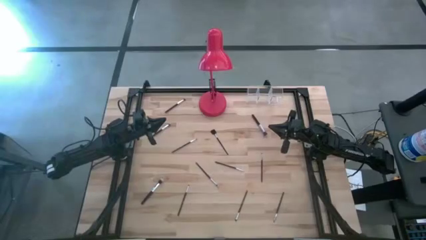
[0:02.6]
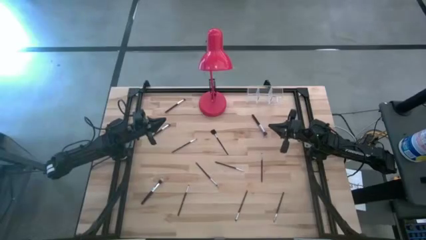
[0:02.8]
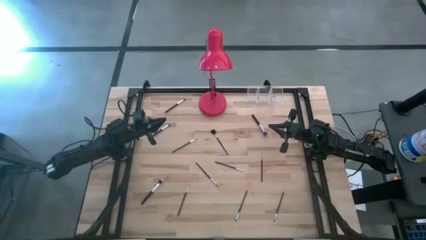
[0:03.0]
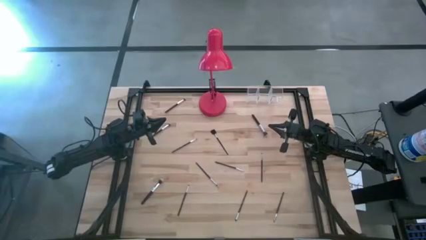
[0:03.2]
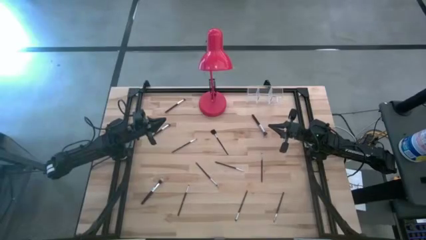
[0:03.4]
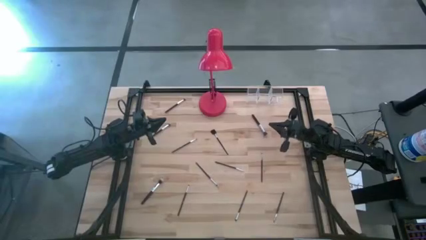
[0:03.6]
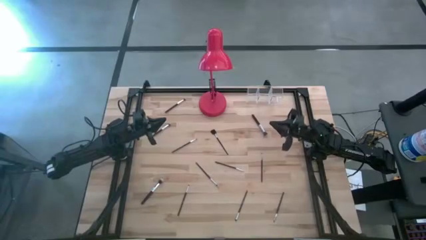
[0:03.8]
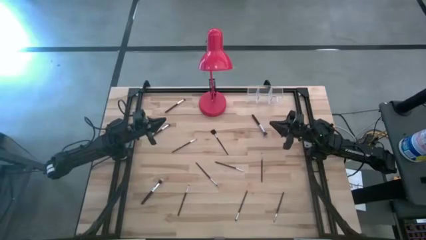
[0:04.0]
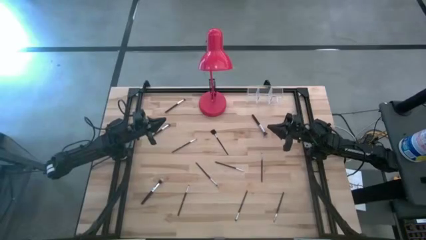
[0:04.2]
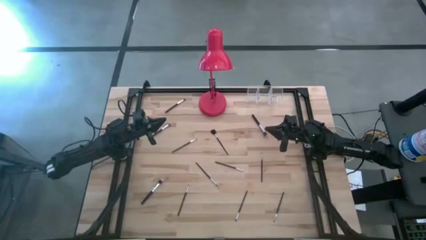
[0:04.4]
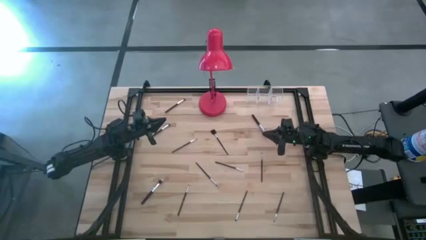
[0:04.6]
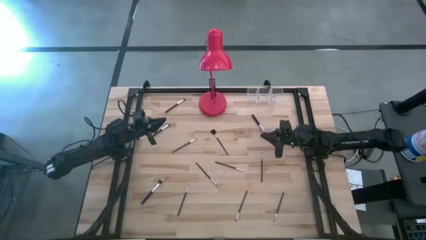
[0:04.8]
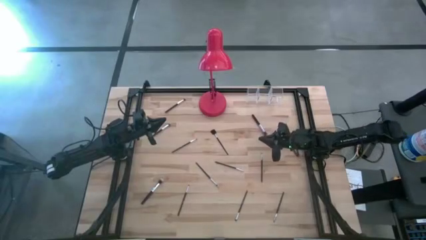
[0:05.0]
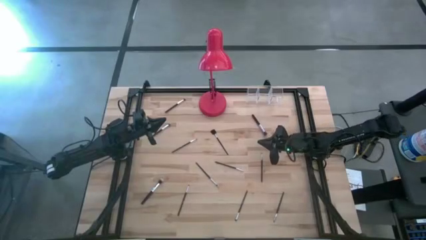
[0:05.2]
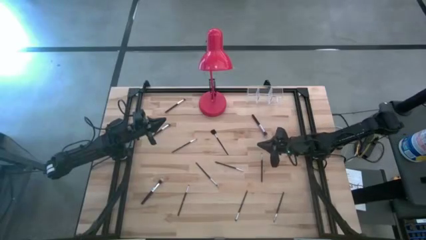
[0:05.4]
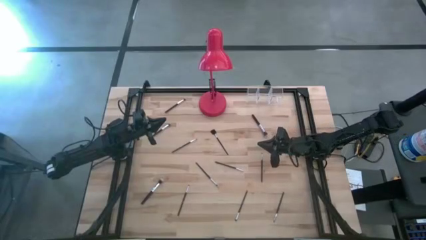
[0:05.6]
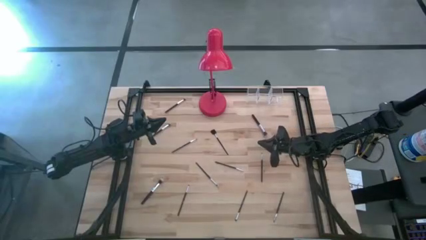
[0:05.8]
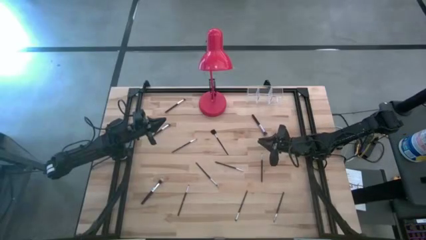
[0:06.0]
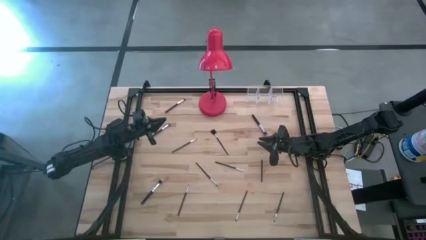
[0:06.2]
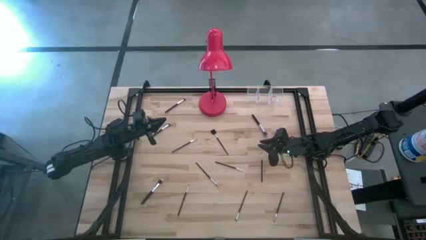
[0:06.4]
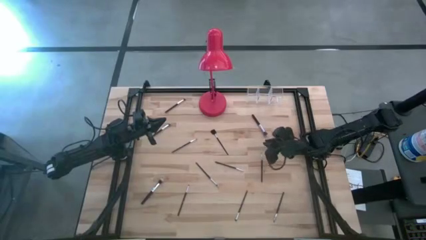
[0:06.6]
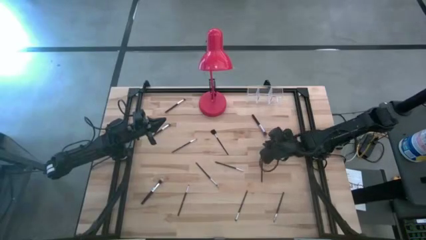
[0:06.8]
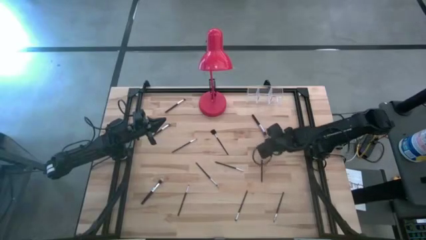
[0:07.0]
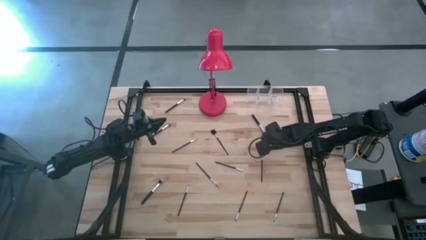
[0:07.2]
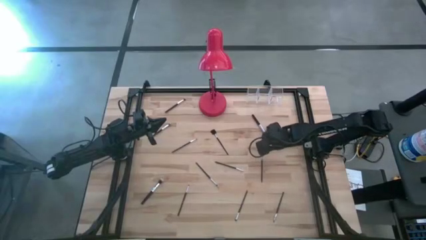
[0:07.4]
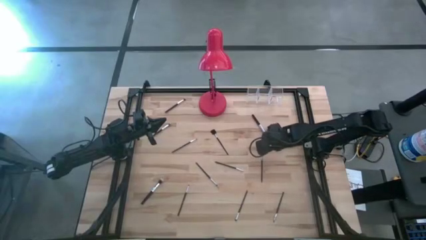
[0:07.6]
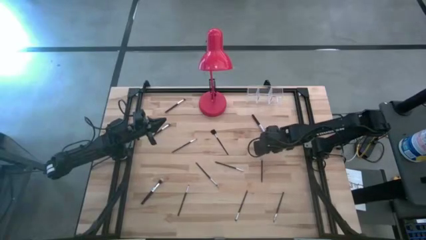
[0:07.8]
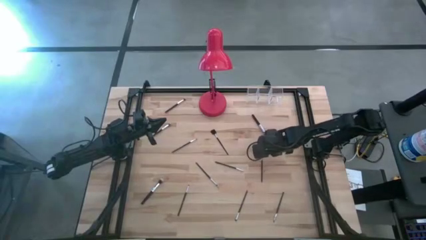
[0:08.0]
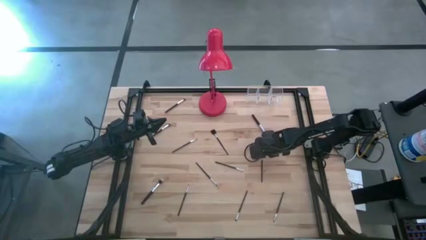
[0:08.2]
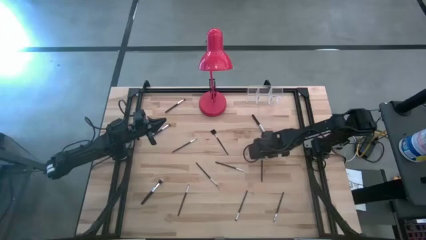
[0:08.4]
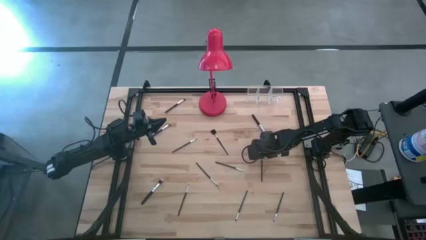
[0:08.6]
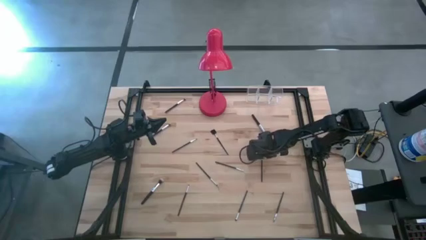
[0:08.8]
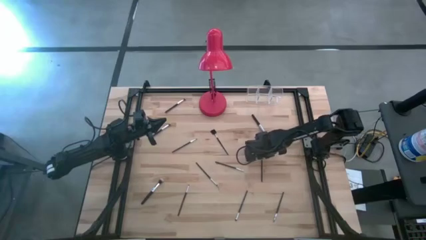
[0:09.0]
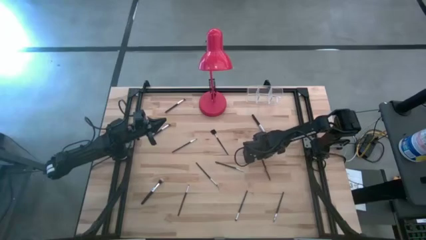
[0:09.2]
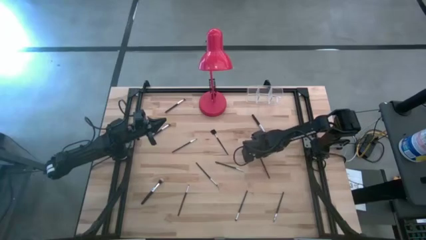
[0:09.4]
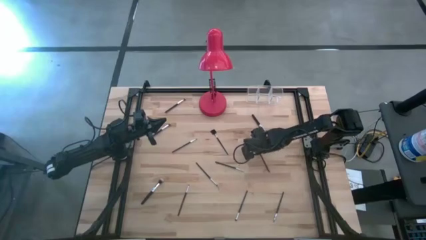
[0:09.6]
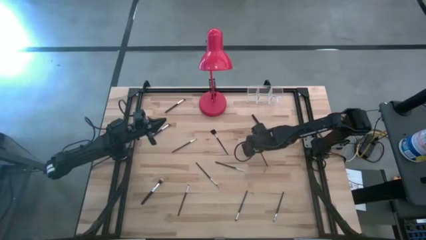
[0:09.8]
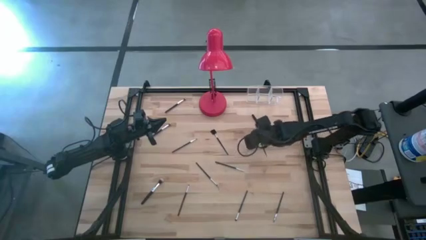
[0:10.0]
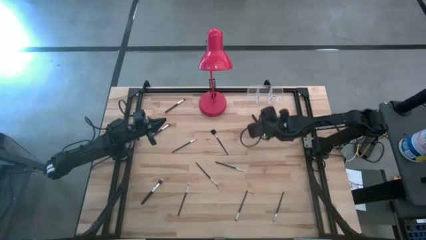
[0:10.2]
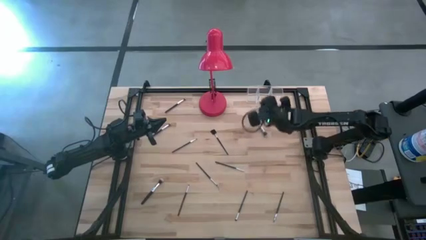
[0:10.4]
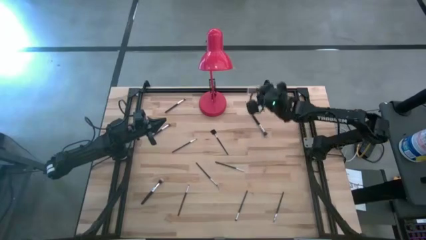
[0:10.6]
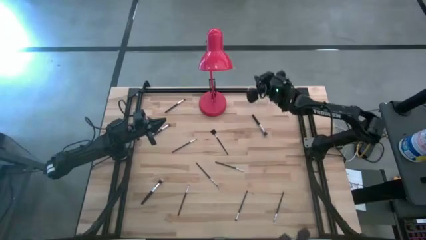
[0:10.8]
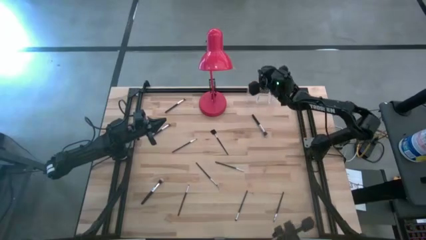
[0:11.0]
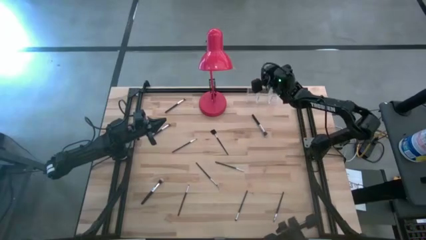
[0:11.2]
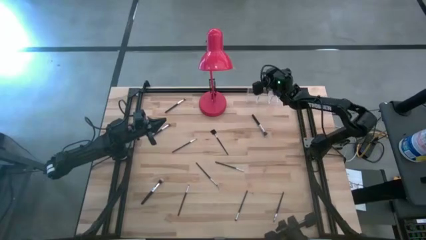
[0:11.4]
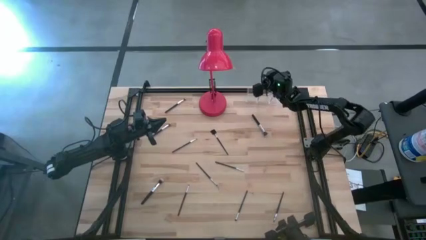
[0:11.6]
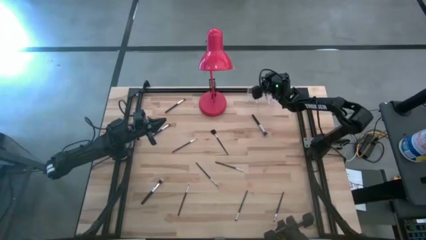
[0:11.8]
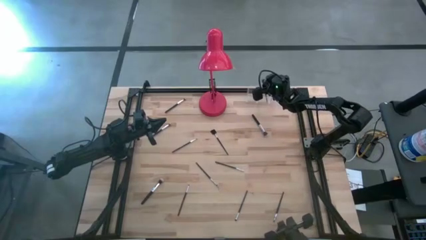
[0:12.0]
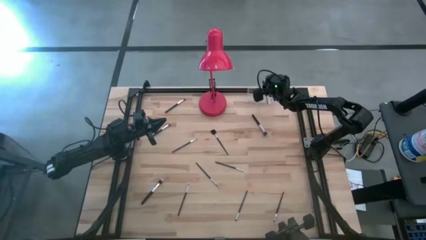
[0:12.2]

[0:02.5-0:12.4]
Task: Sort items
Put the black eyeshadow brush into the transparent organizer

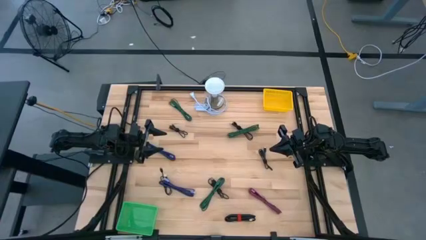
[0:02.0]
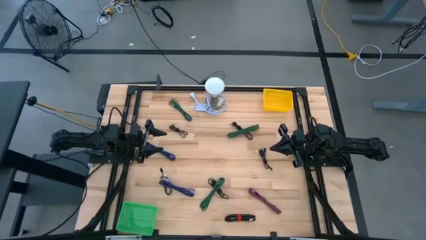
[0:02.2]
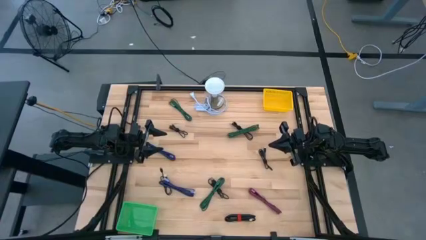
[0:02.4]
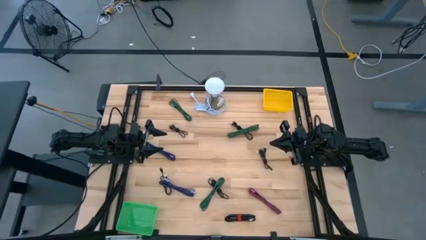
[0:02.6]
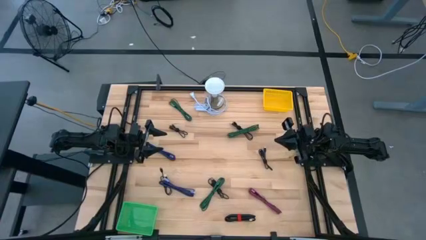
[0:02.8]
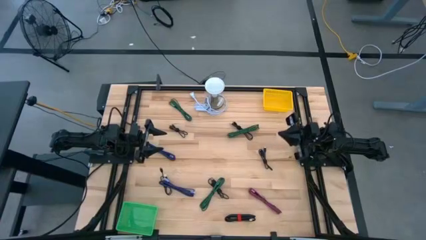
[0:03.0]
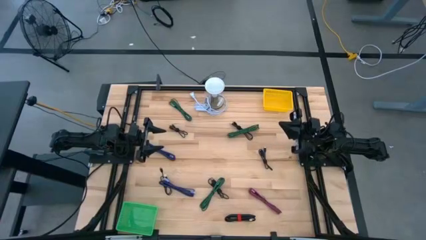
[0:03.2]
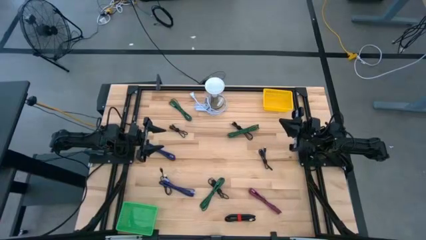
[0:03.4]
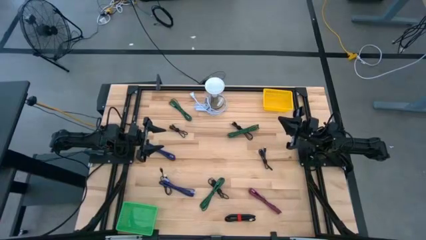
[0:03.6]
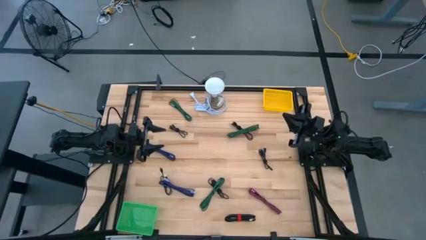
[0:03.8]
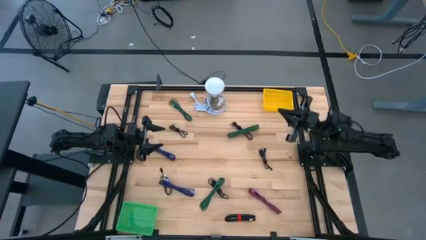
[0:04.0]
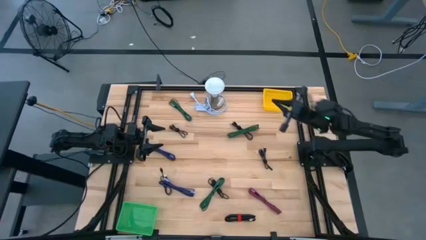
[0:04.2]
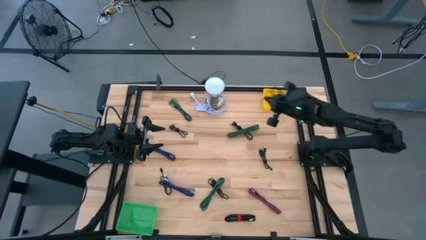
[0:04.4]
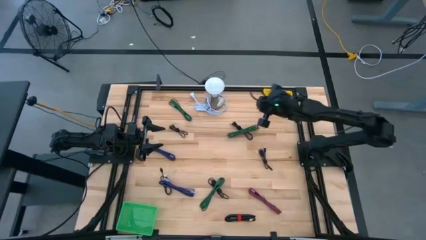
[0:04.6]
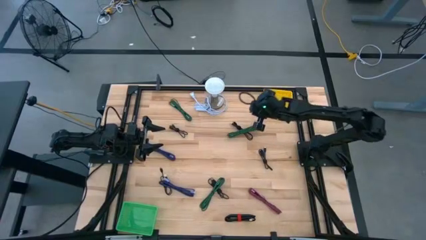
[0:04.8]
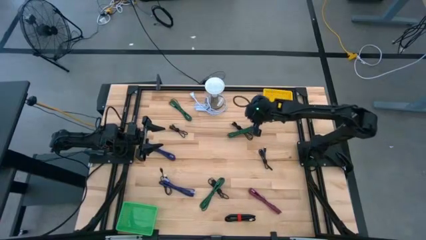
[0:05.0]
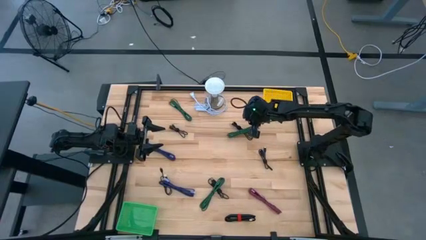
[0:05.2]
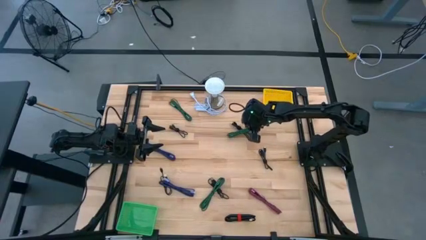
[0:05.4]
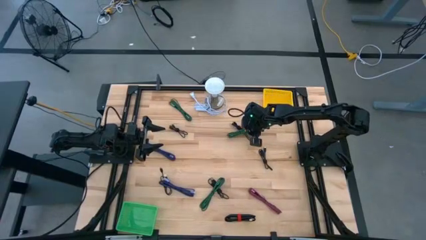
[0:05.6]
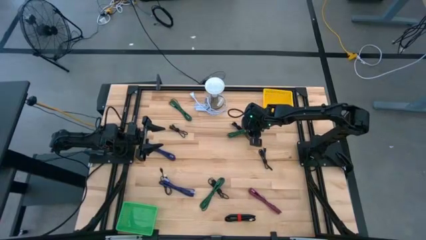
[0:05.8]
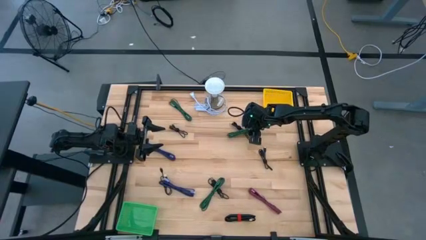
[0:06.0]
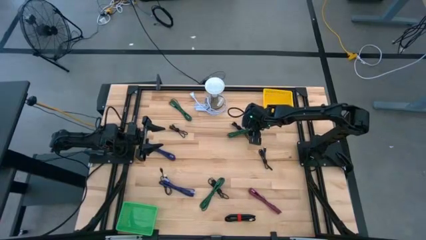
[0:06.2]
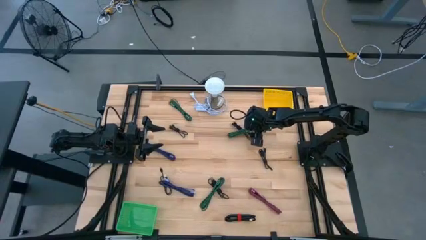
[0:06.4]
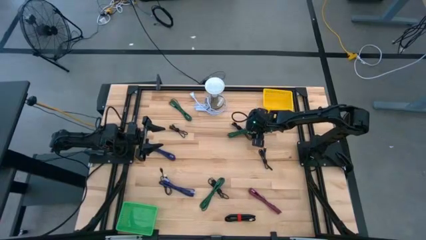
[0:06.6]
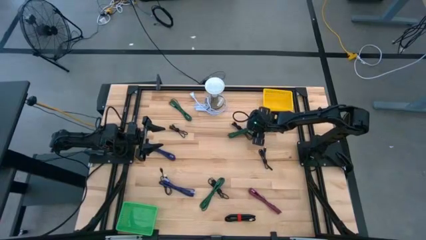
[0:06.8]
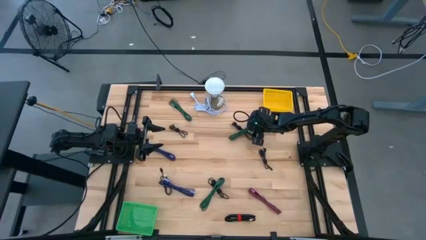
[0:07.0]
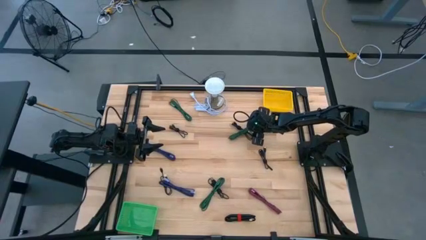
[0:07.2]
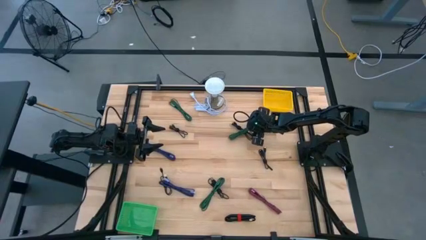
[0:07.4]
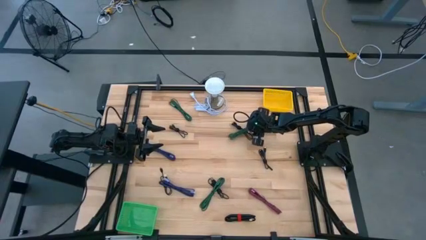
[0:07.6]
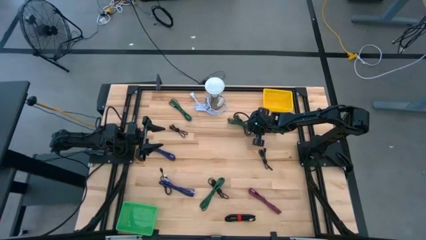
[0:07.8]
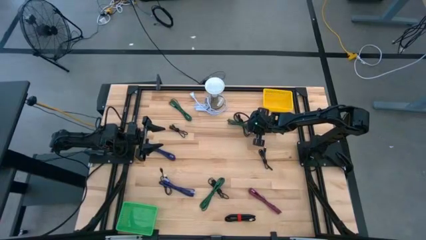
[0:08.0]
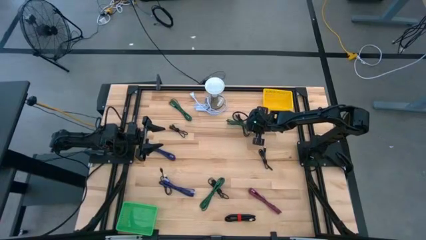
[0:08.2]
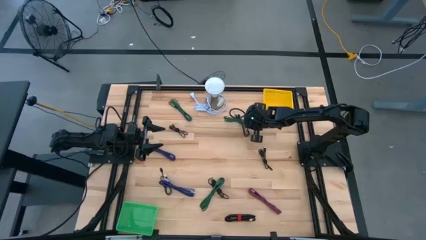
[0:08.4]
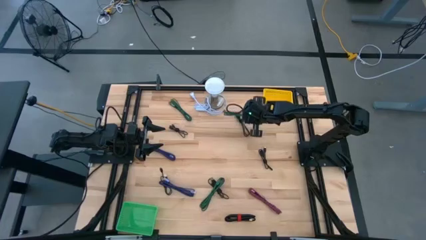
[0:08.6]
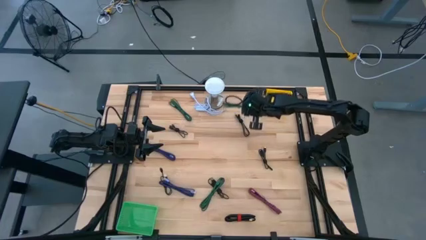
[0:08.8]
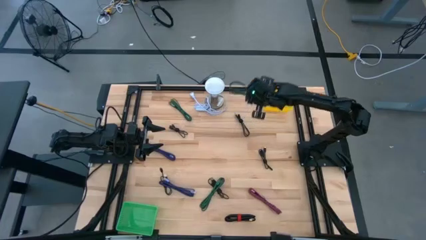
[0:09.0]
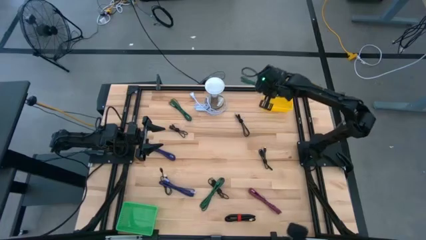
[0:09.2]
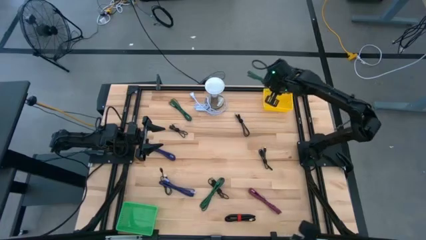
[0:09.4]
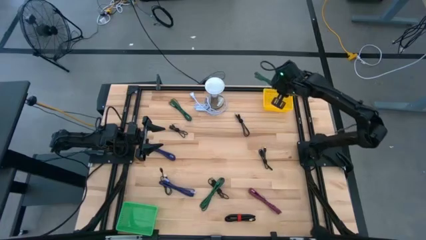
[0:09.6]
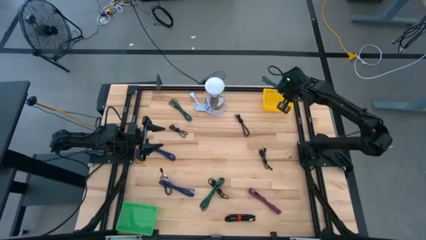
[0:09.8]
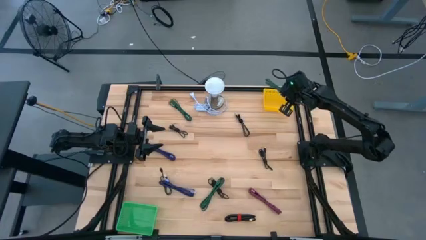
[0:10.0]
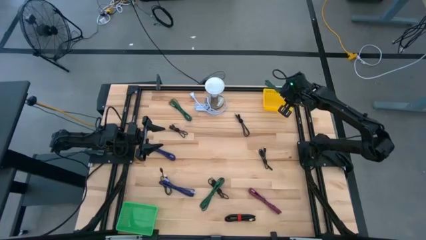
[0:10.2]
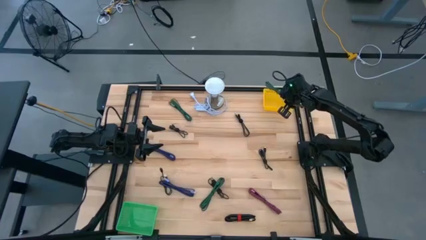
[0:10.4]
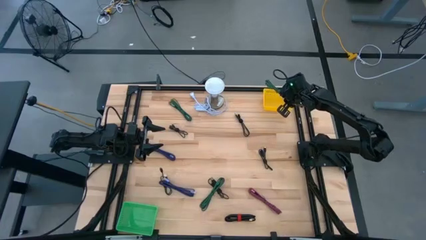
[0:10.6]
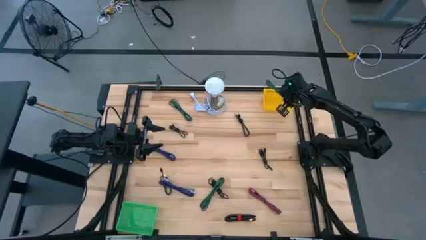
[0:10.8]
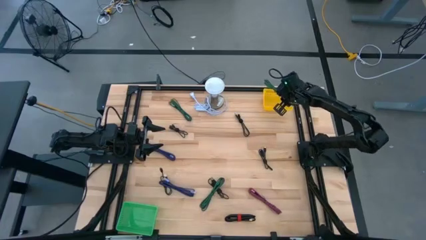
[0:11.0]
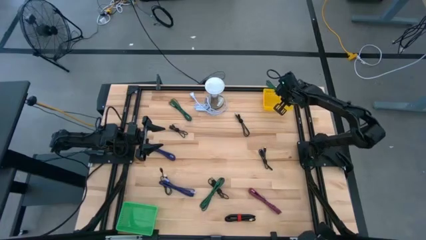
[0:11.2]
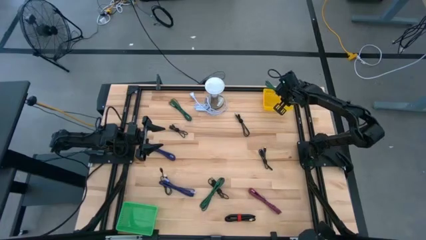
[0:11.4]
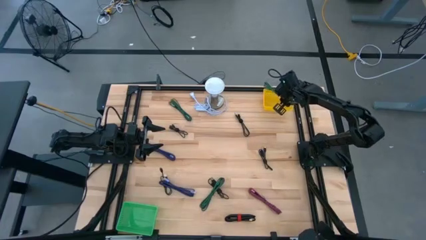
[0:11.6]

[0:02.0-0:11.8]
Task: Pick & Place USB Port
Put the green USB cable into the yellow bin
